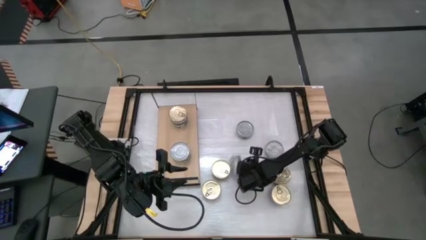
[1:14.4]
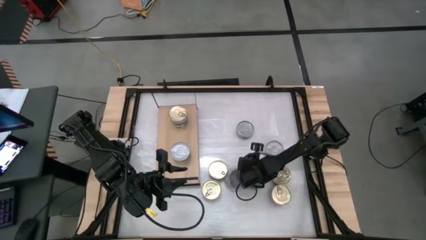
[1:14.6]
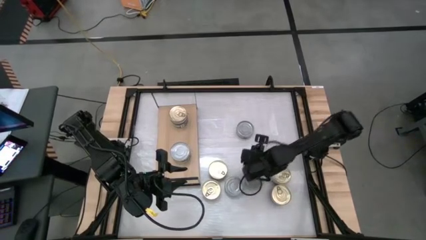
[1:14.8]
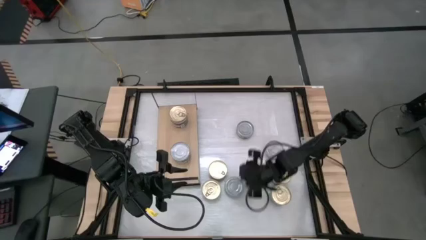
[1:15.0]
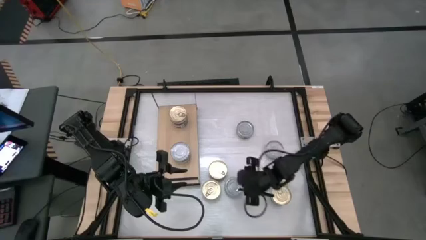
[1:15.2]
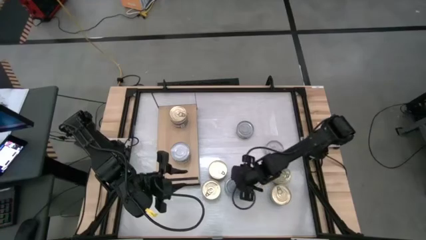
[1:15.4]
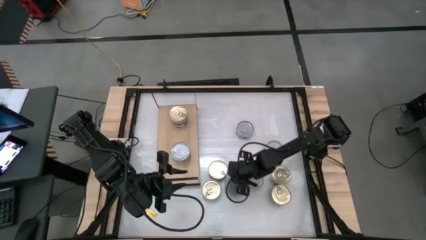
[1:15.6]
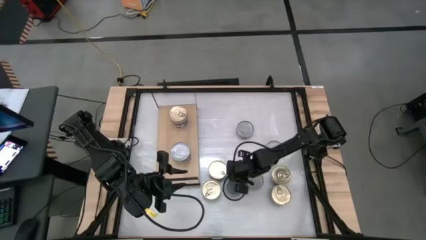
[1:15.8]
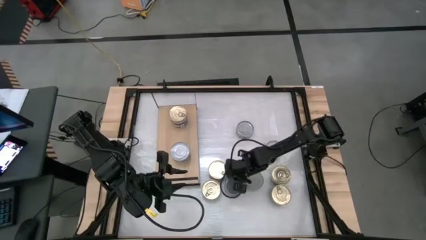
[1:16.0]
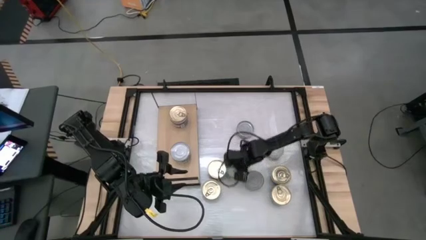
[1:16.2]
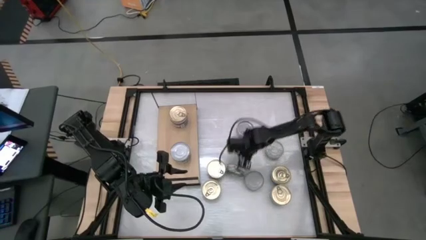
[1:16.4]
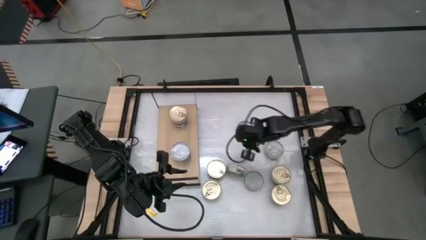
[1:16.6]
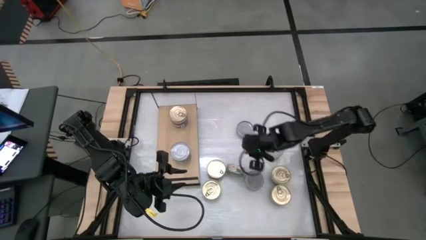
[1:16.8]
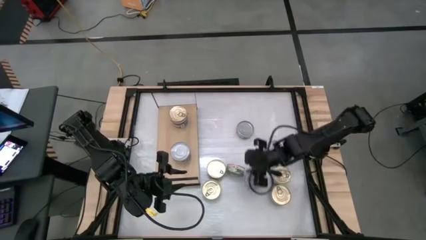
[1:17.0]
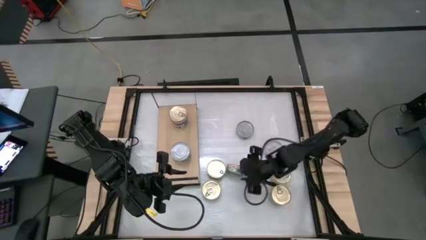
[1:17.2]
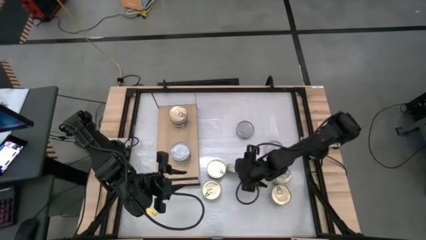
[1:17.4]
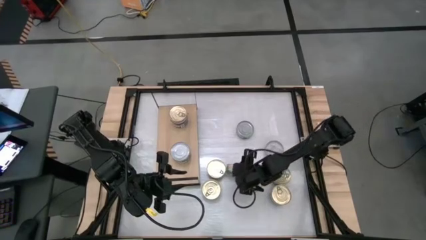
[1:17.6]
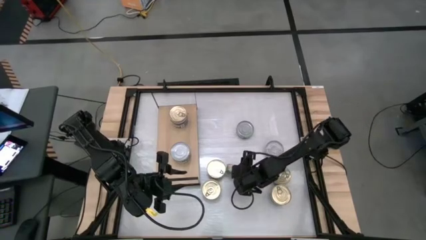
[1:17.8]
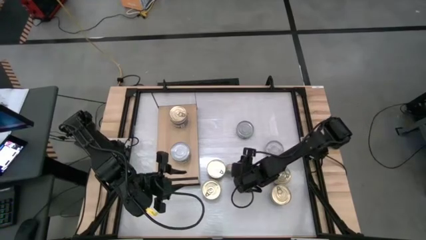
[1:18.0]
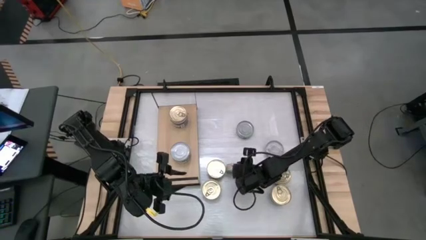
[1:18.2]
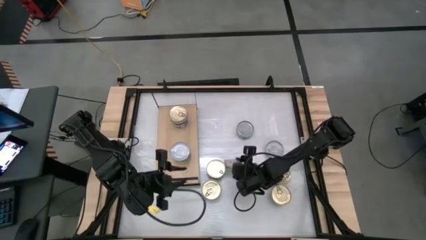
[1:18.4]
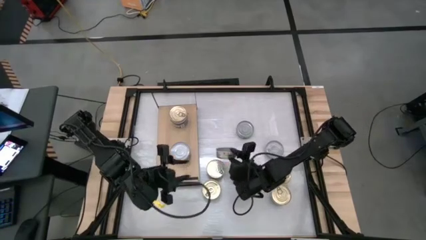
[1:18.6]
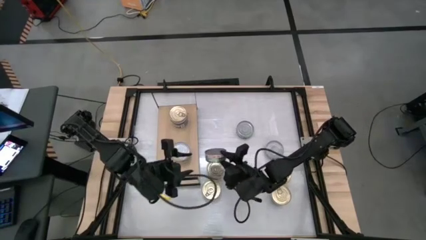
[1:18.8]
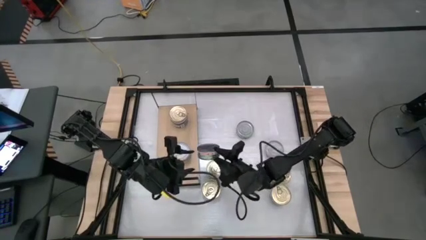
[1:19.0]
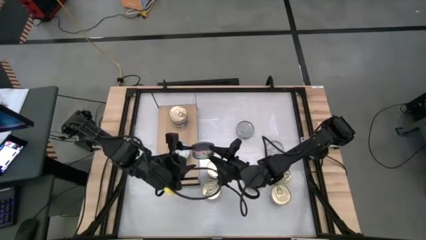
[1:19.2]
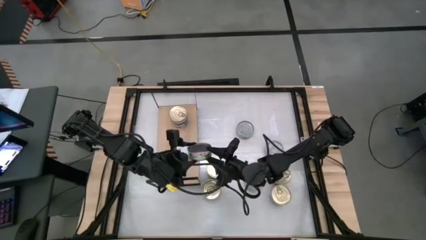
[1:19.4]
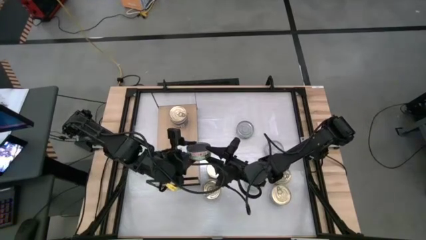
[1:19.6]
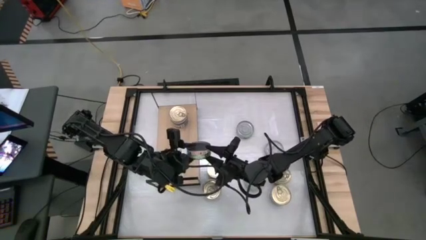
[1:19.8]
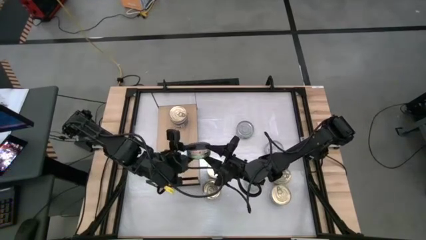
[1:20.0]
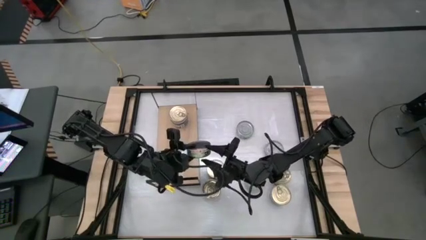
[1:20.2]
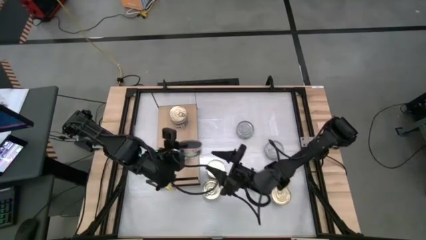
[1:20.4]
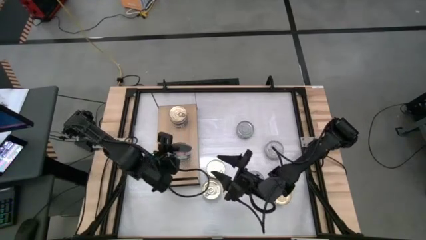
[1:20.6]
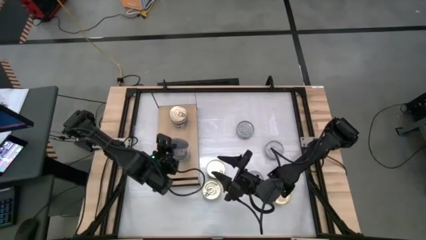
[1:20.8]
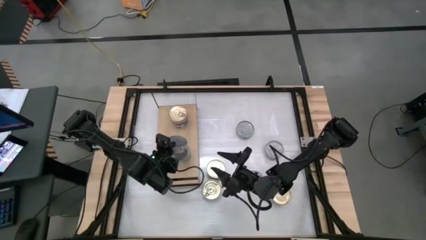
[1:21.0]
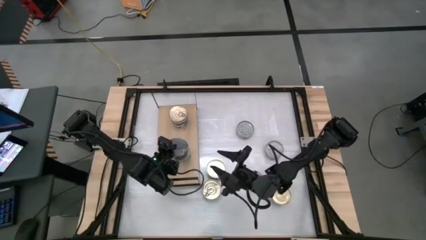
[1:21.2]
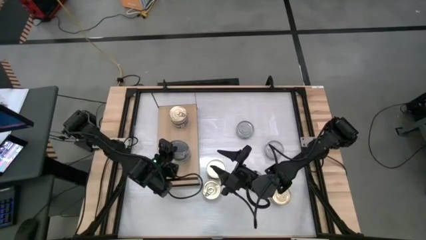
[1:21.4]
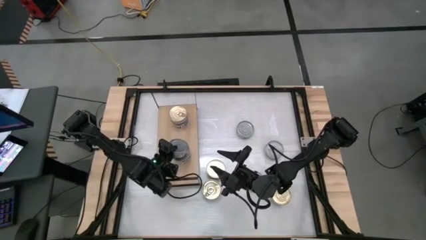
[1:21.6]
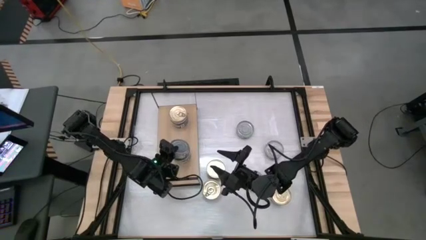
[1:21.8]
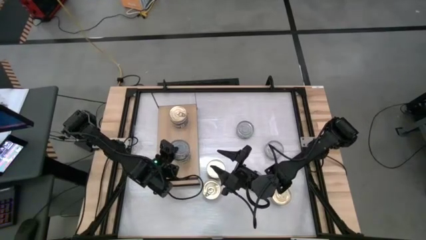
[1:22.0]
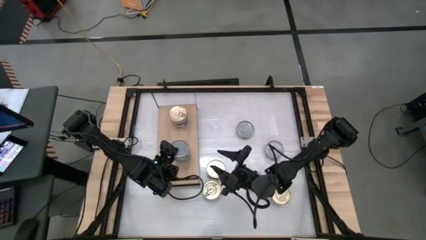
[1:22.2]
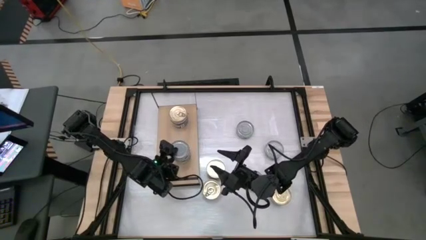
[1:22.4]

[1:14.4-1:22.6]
Task: Stack canned seafood by type on shelf
Stack the green tuna can on top of the other green tuna can on the shelf

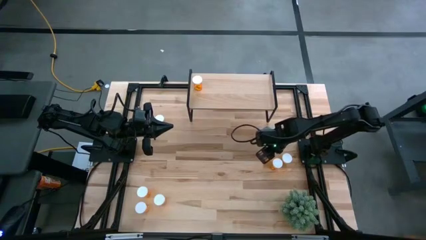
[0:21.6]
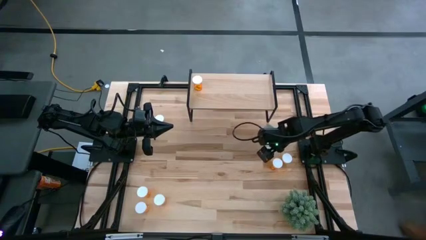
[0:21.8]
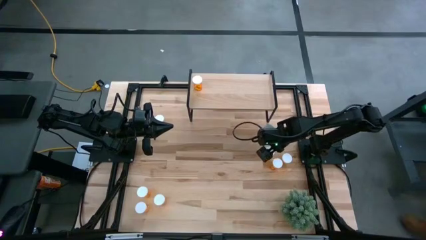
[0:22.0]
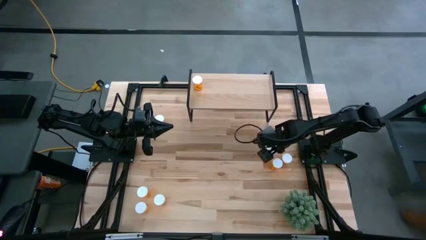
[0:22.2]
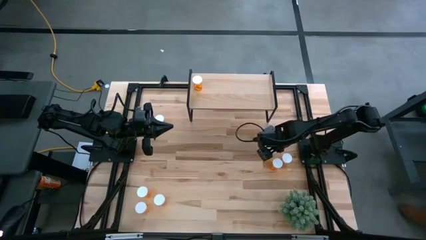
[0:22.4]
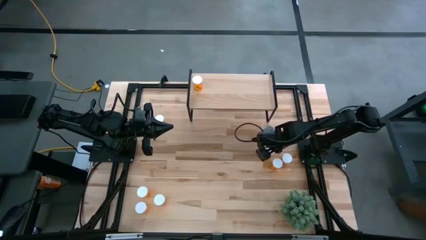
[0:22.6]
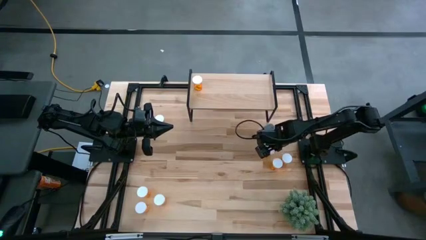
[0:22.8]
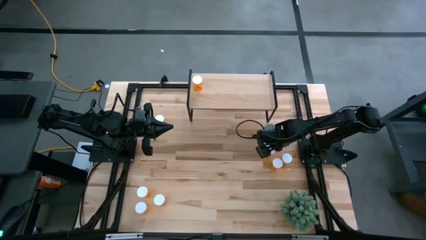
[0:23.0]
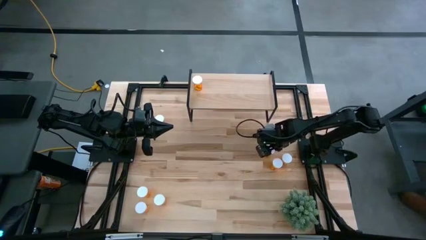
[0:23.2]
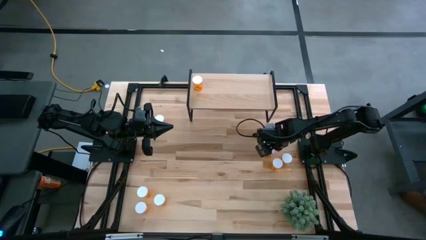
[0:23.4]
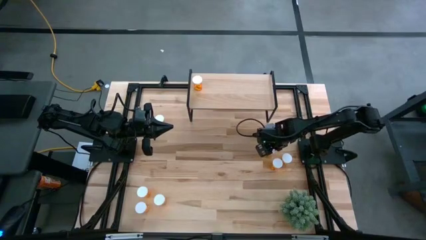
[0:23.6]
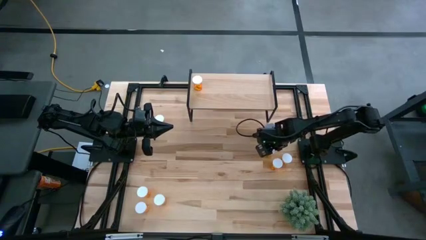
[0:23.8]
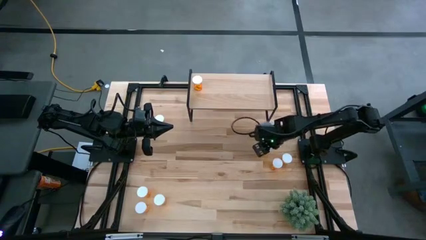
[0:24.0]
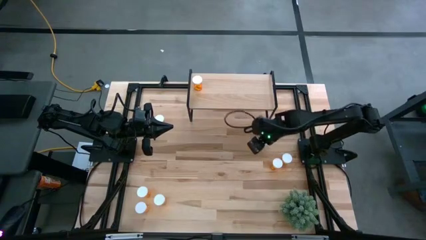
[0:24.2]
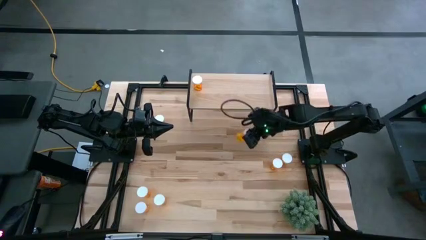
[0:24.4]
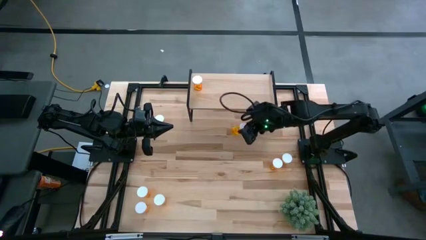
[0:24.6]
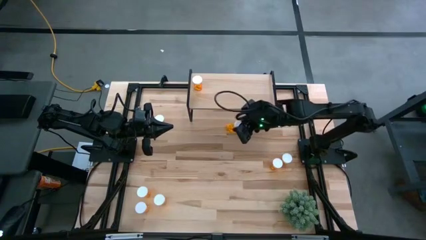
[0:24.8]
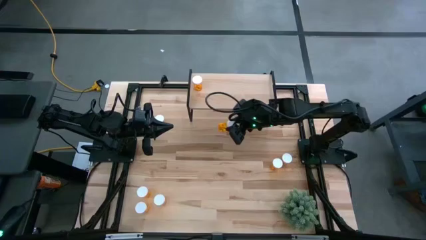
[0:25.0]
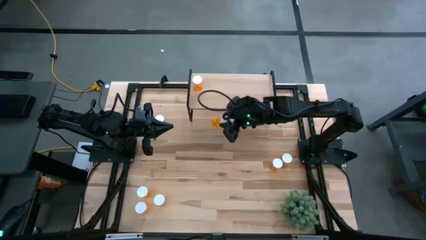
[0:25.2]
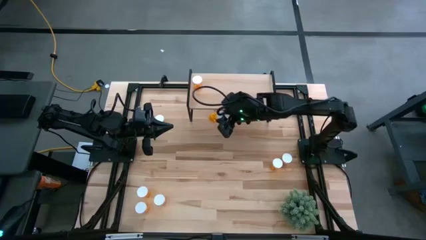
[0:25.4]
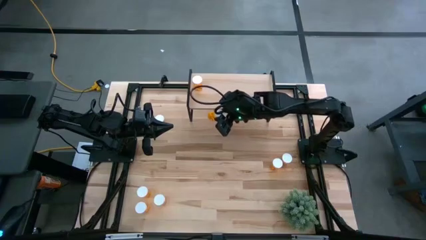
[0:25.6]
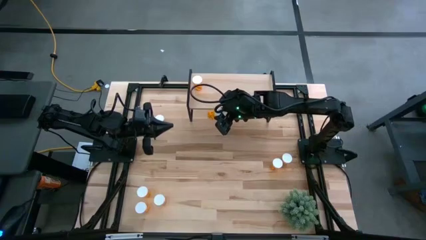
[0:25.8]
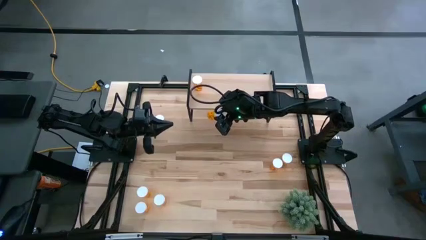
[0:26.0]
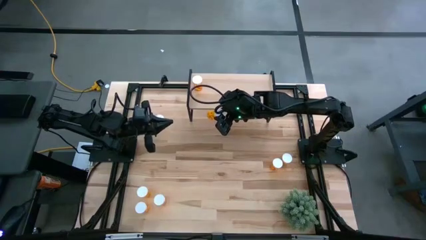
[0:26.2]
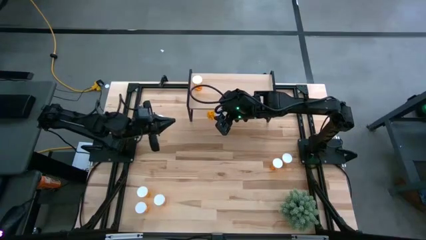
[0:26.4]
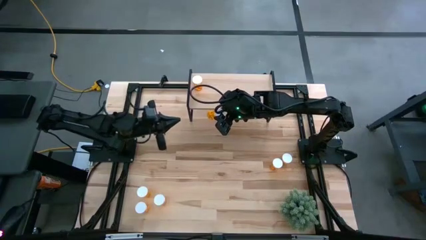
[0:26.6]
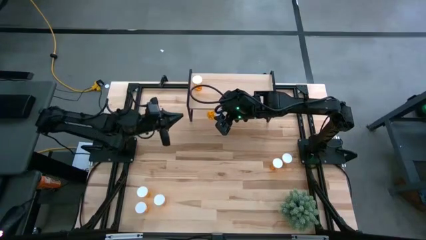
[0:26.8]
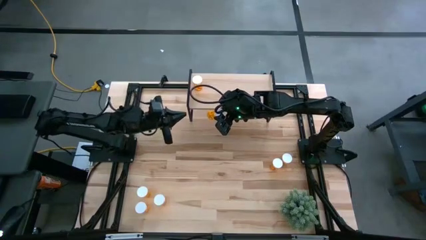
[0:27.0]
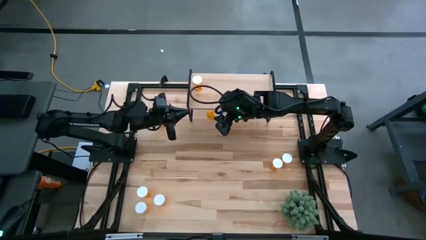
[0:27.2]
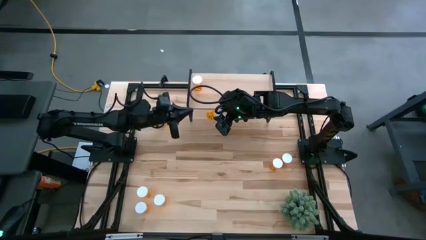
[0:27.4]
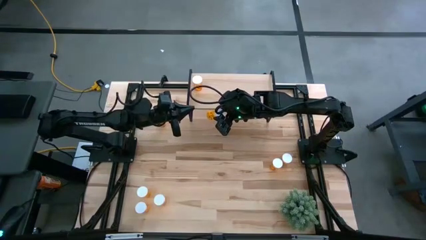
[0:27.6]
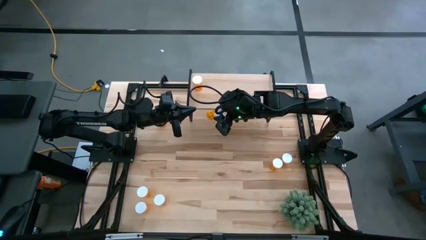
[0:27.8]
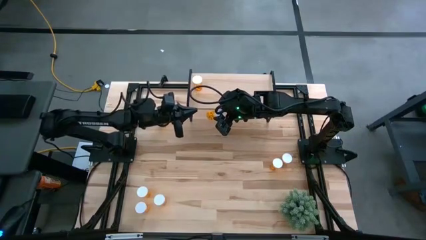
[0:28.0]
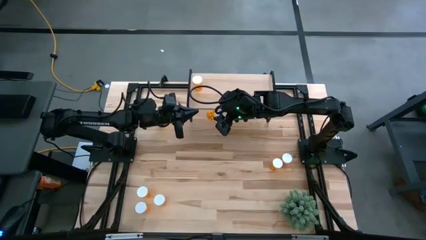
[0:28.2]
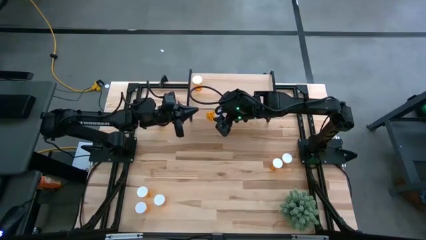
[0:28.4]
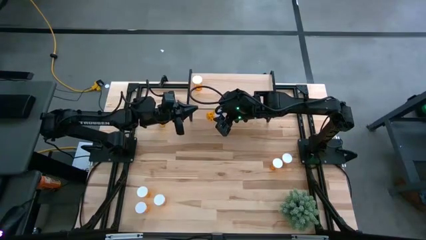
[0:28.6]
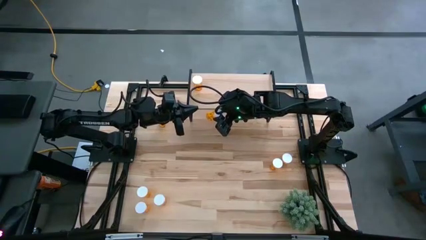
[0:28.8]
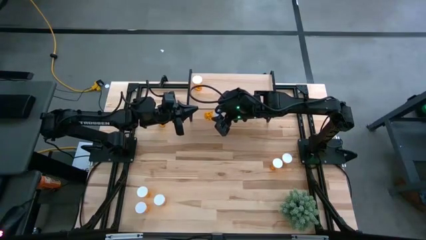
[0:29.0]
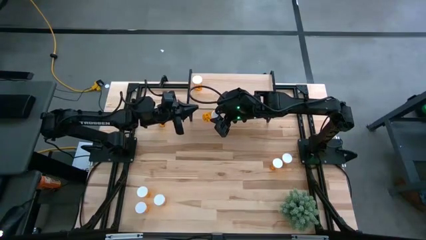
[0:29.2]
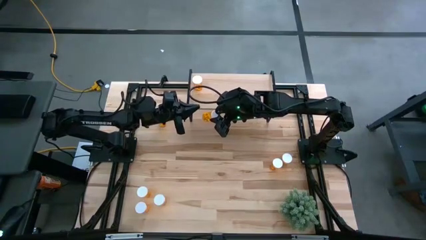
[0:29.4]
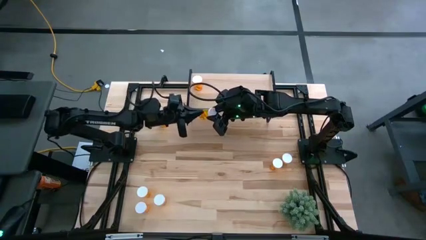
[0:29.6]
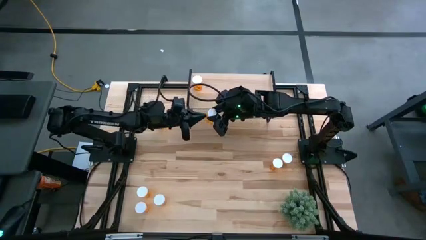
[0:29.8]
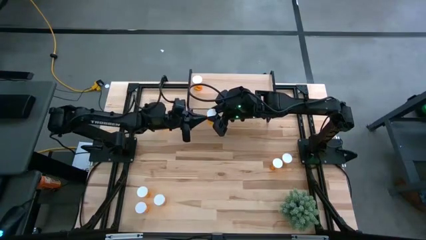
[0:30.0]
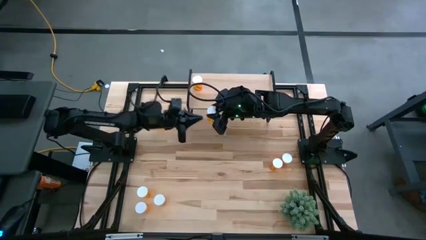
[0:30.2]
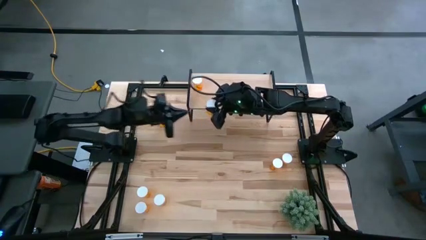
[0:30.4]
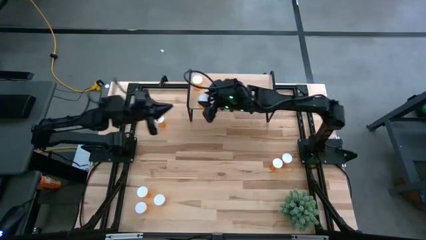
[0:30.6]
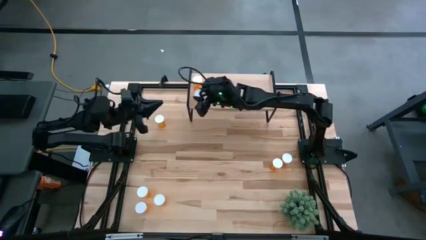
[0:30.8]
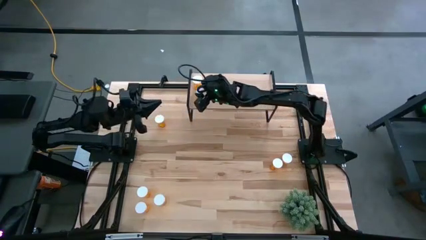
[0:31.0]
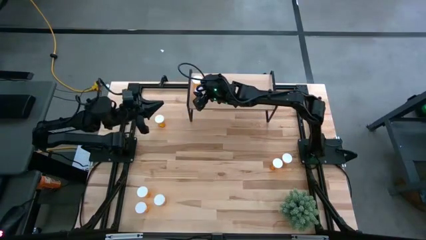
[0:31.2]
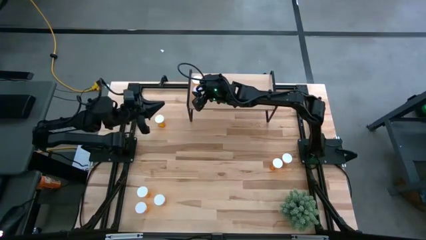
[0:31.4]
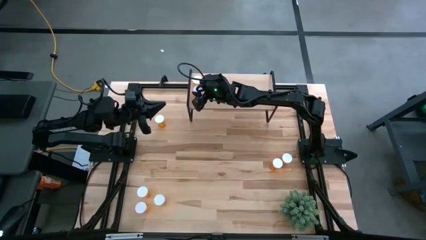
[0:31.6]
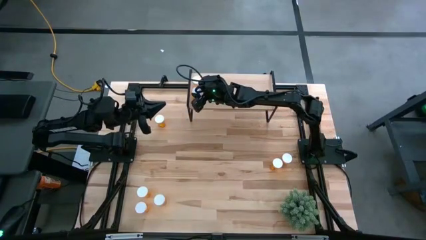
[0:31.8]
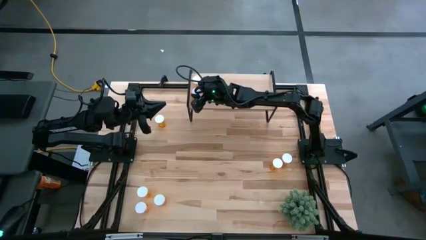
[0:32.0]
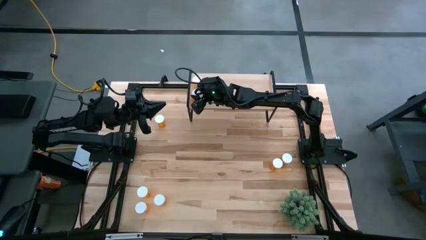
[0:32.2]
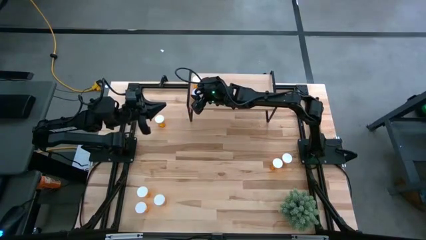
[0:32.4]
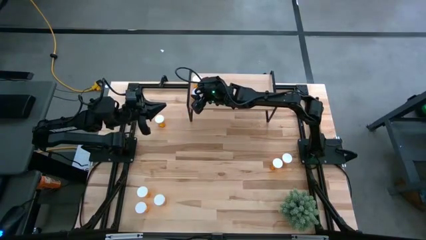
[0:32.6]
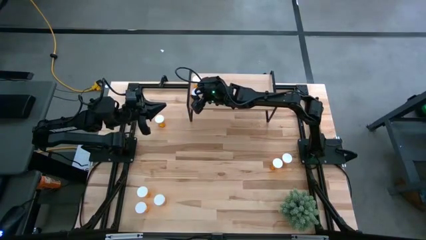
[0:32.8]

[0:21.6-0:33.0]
Task: Pick and place medicine bottles onto shelf by color
Put the orange pill bottle on the shelf aligned with the other orange pill bottle
